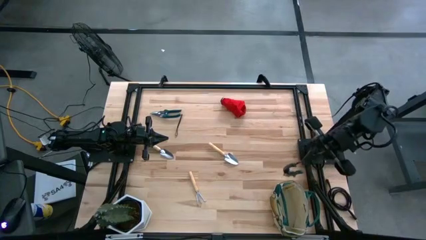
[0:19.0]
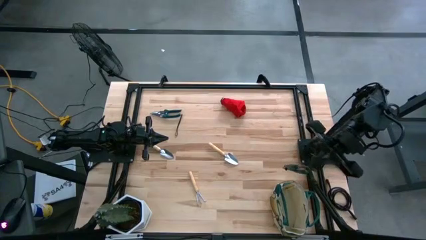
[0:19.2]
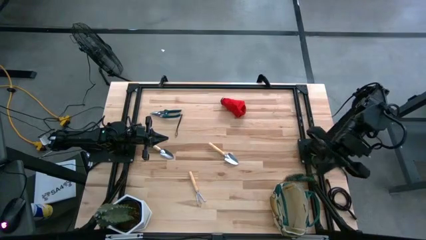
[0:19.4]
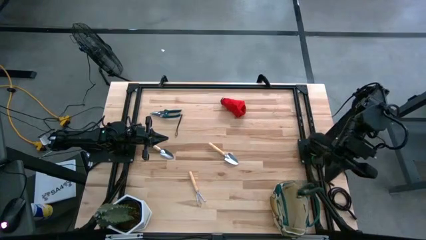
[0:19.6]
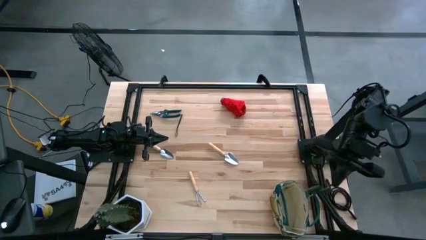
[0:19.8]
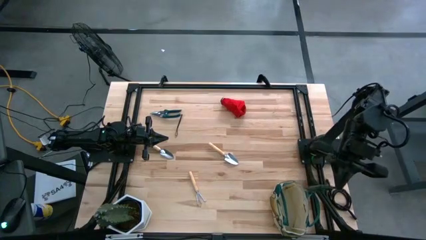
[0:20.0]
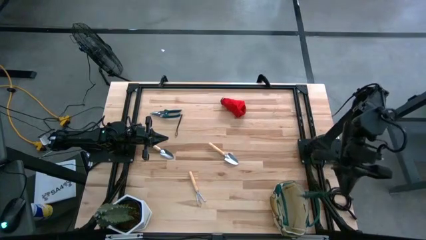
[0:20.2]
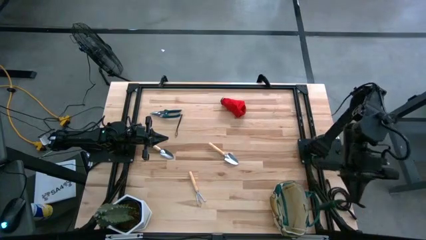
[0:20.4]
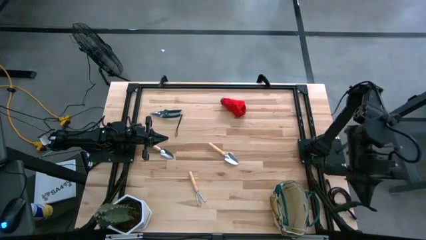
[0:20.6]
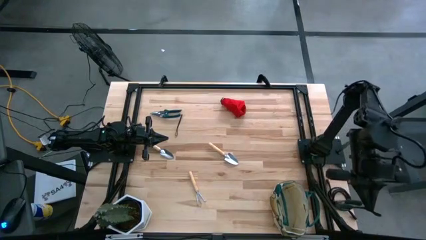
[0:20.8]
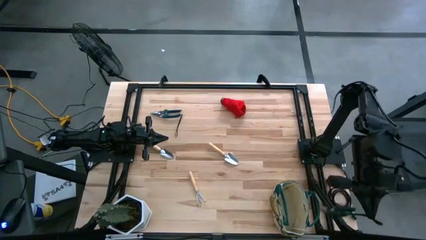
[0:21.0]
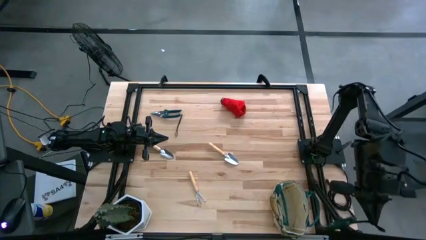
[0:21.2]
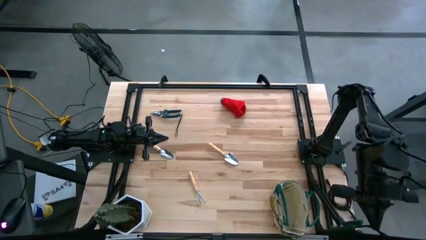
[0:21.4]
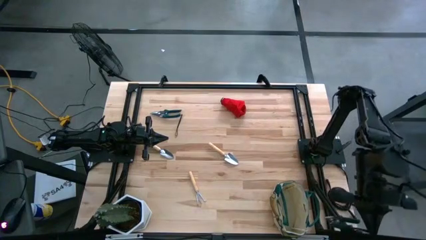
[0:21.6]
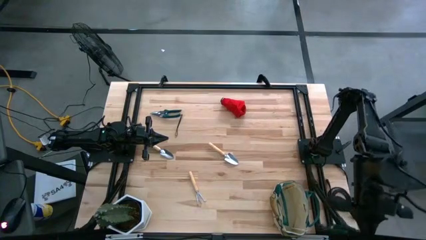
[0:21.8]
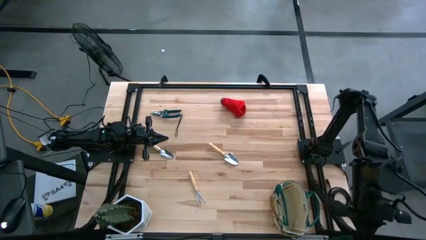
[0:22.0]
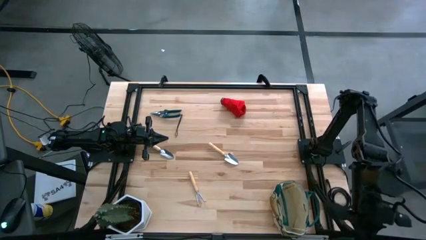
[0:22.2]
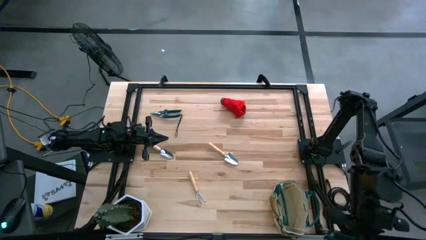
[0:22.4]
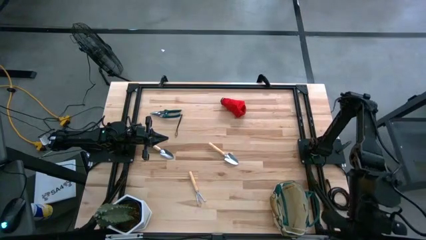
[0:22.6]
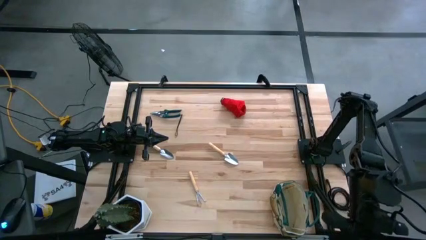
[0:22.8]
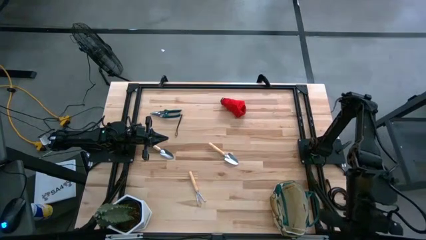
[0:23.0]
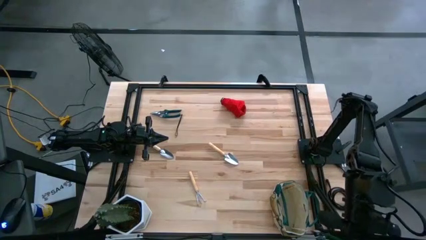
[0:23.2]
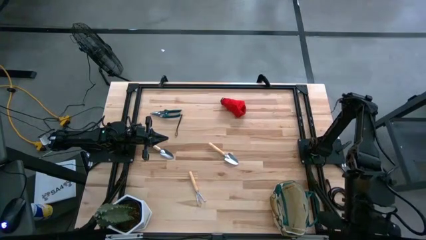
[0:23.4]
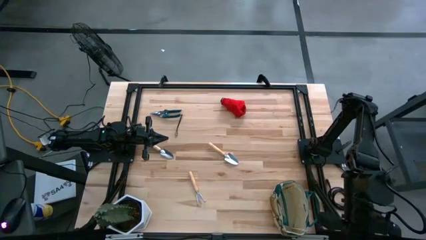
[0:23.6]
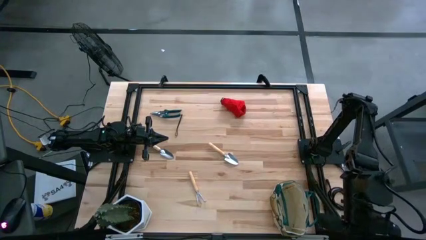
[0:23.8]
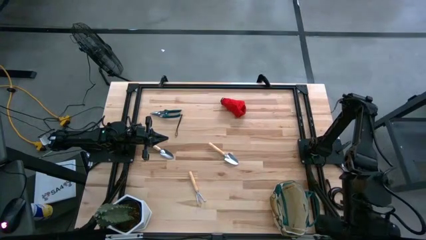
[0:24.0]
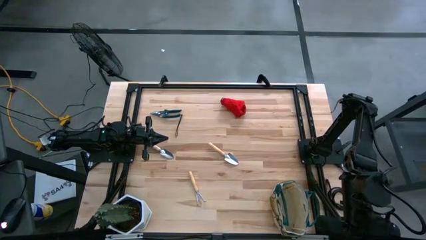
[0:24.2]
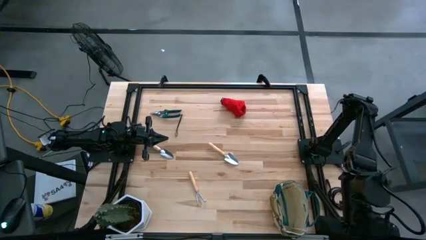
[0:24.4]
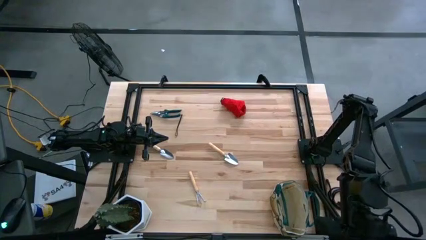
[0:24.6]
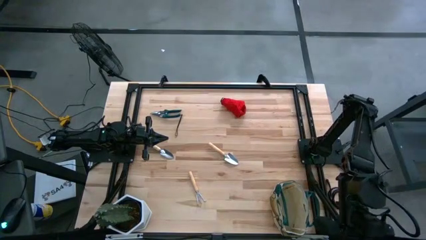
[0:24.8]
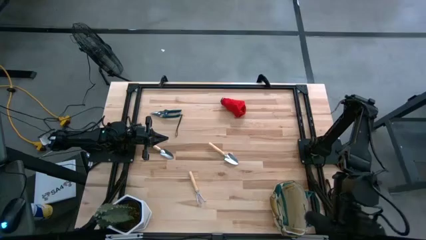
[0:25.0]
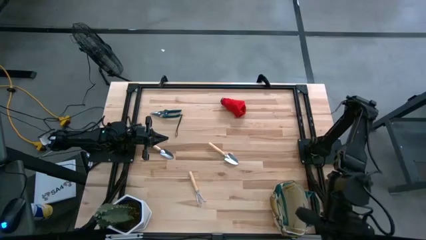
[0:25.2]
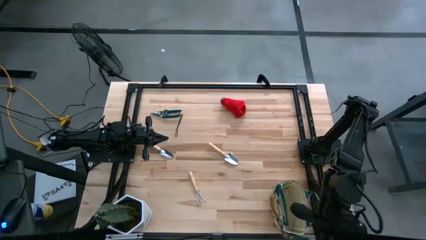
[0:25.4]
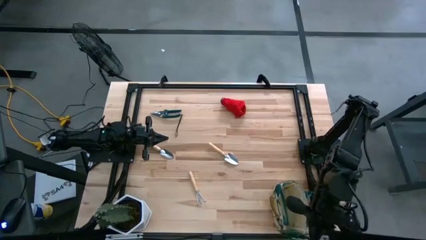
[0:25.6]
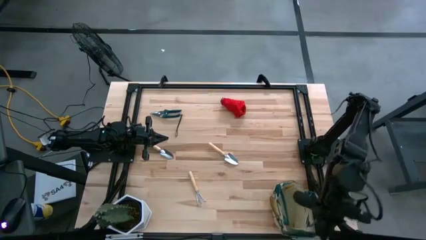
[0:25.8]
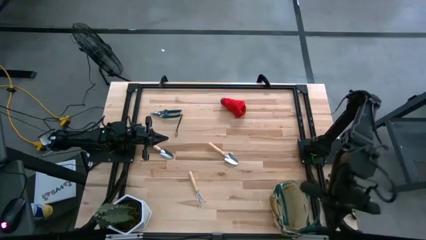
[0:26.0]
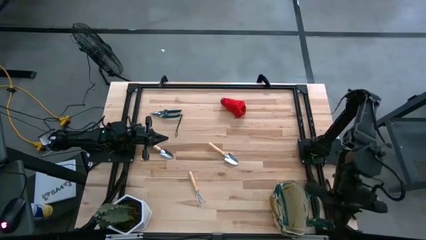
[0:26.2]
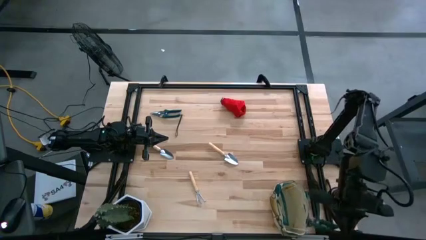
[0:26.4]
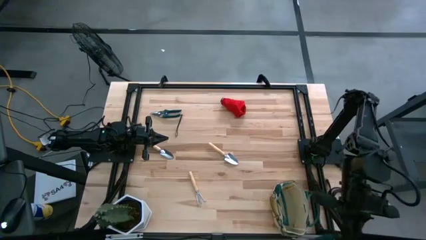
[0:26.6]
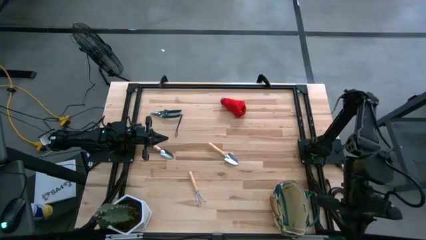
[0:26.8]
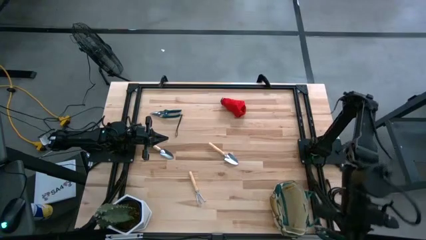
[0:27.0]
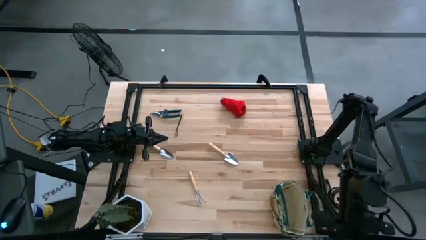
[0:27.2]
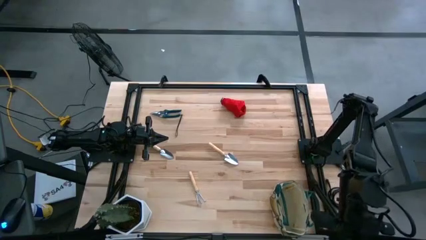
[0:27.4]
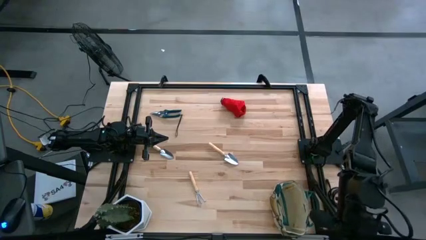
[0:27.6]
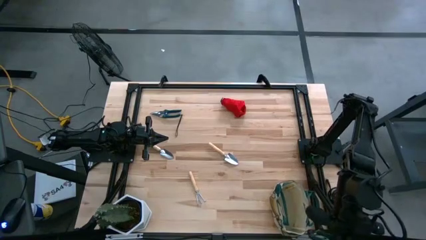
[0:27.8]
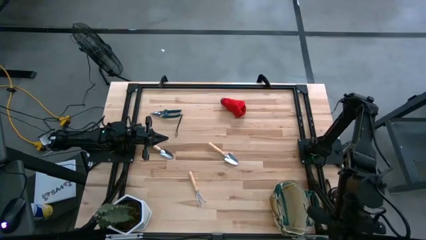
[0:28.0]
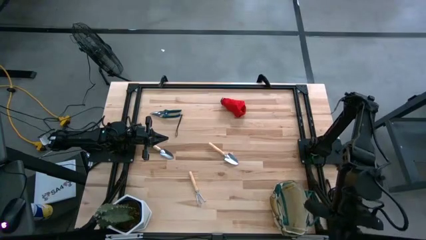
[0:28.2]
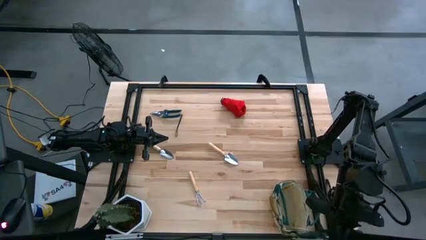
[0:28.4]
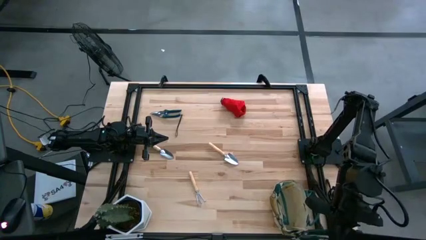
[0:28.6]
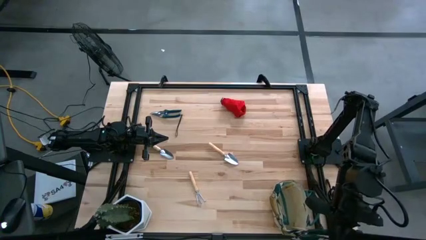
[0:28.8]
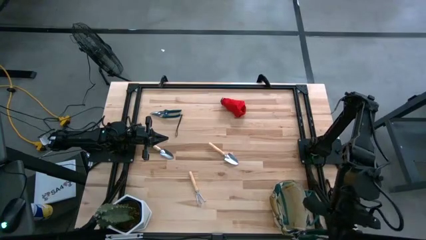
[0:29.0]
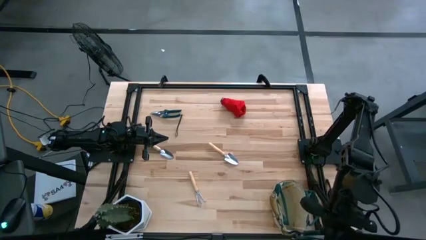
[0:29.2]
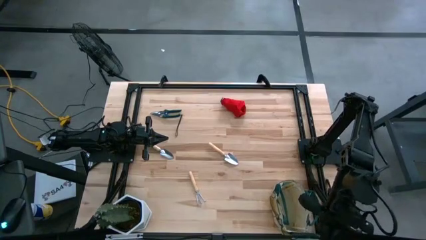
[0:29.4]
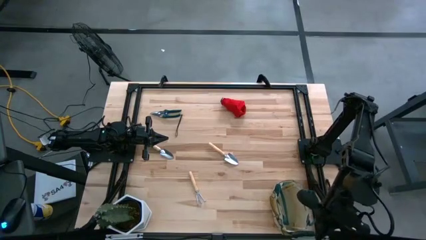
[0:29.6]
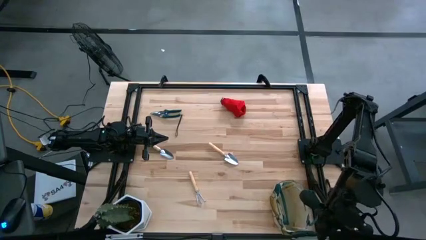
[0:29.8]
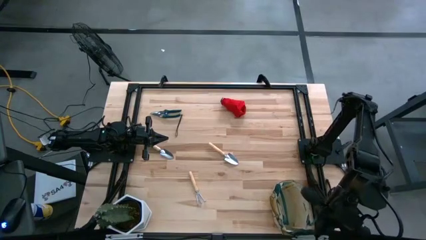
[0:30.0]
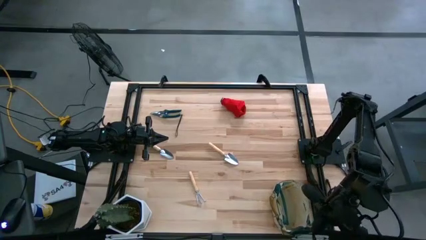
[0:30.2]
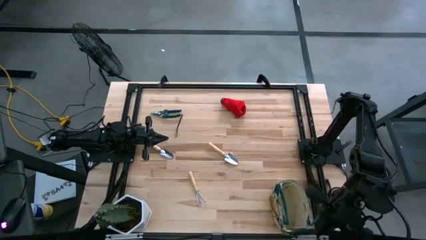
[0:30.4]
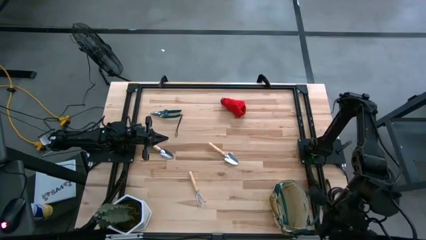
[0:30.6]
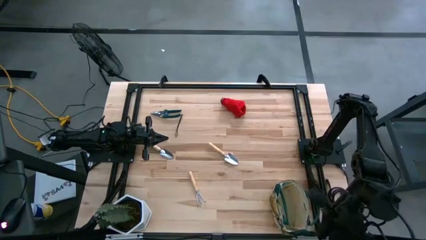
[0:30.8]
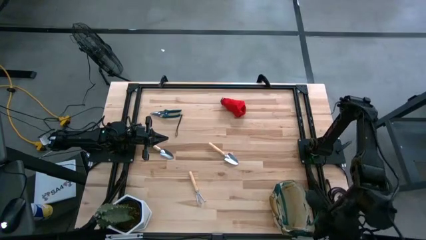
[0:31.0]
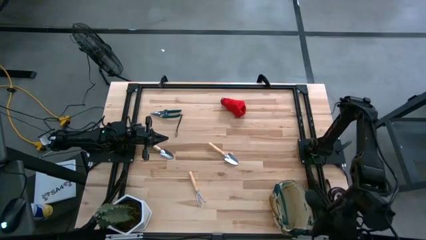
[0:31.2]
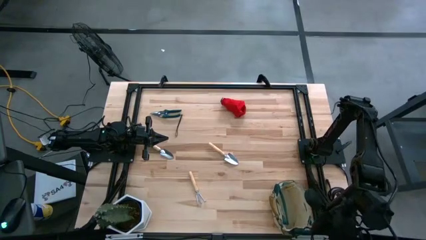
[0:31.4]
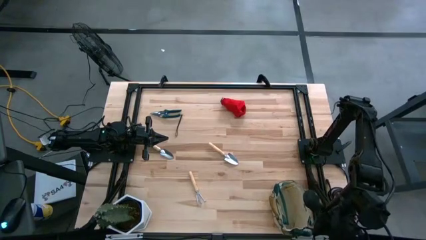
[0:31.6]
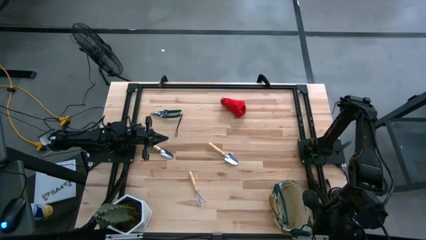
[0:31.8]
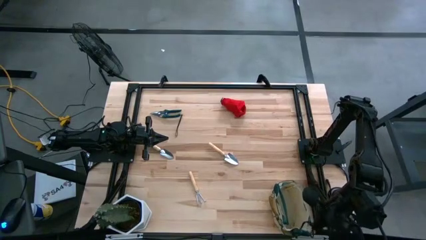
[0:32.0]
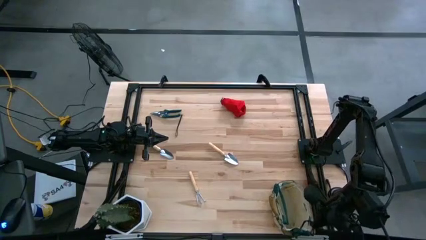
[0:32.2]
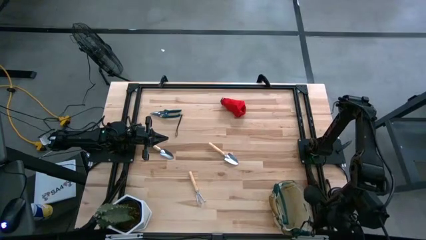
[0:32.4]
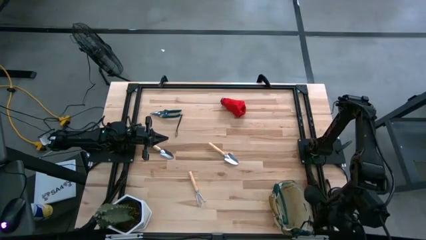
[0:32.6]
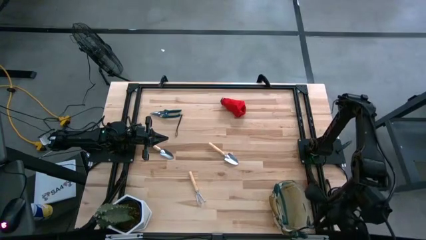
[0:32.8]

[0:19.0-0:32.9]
Task: Pick & Place Garden tools in Gardening bag
Put the right green shear scissors into the gardening bag
